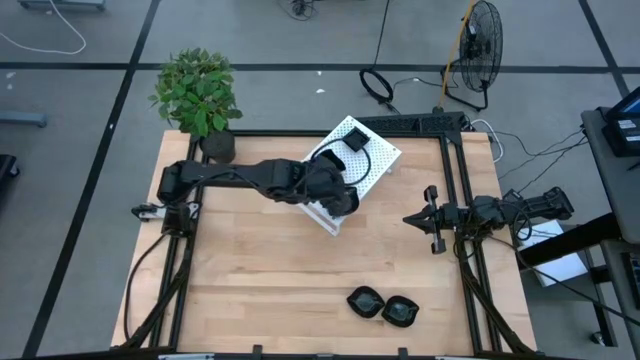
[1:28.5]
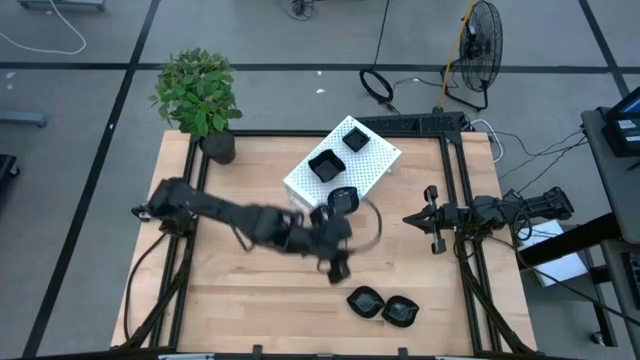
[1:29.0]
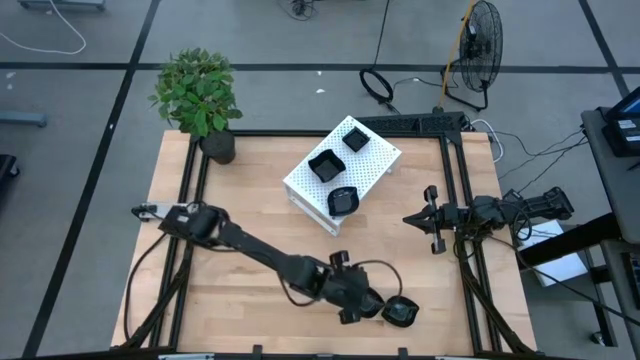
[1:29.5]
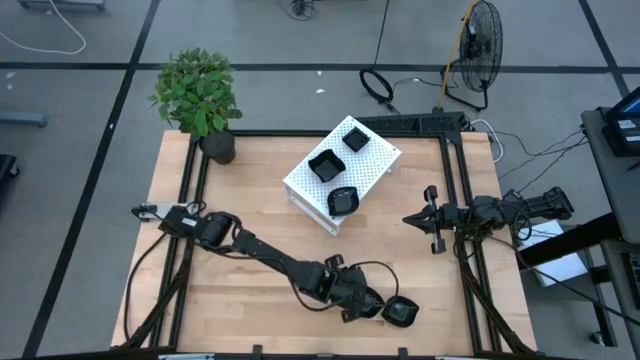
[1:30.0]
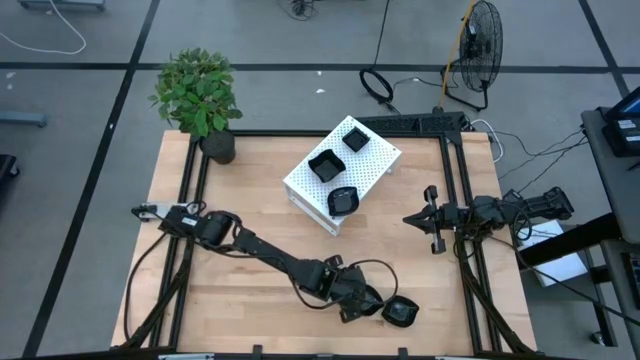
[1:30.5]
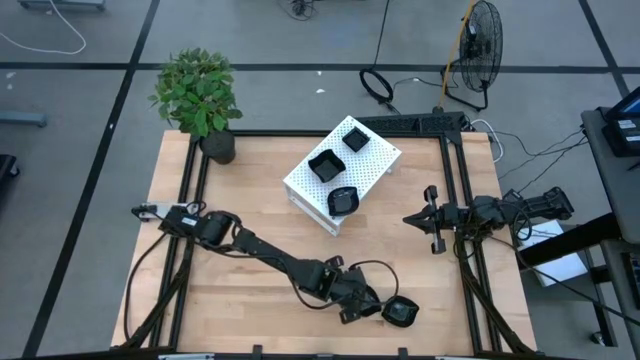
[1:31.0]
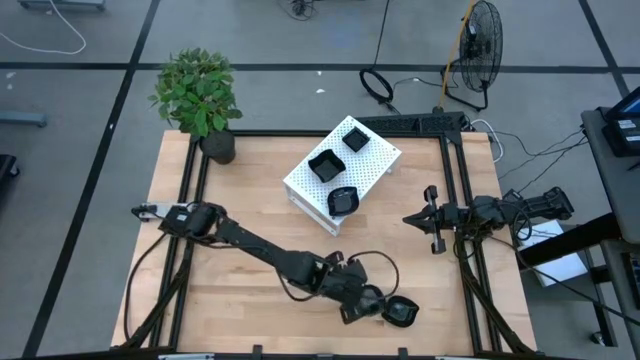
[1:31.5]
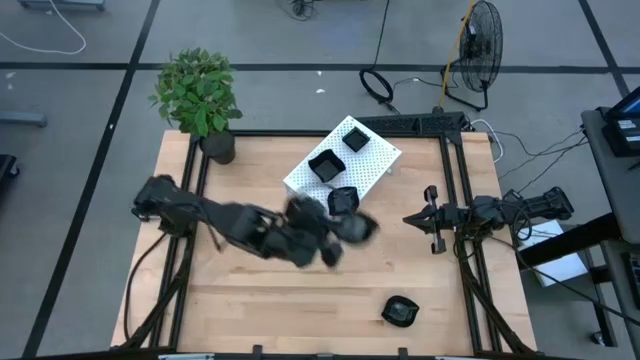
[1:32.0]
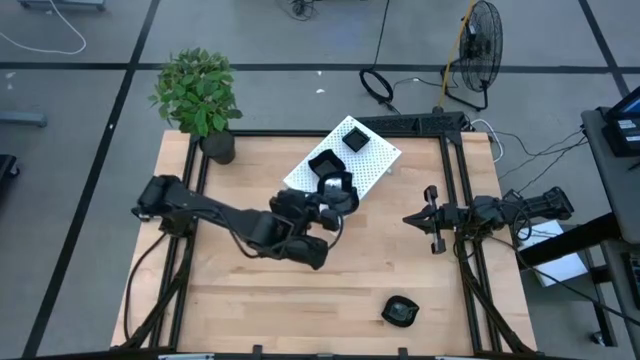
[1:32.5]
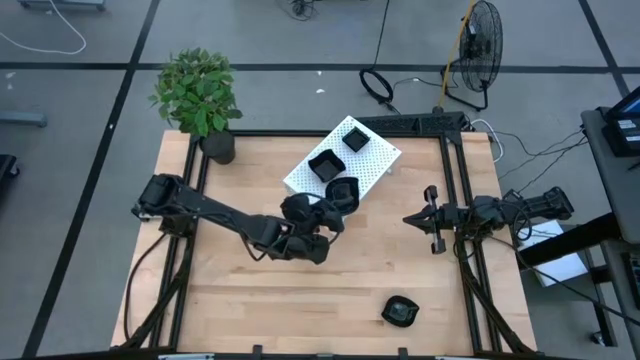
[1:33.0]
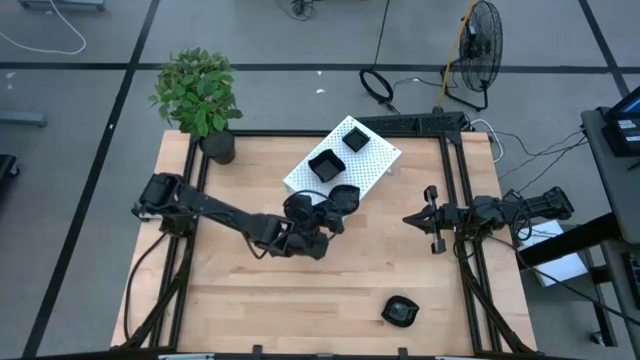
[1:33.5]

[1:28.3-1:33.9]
Task: Pick & Place Mini shaped plates
Stack the black leaf shaped plate on top of the black leaf shaped plate on the shelf

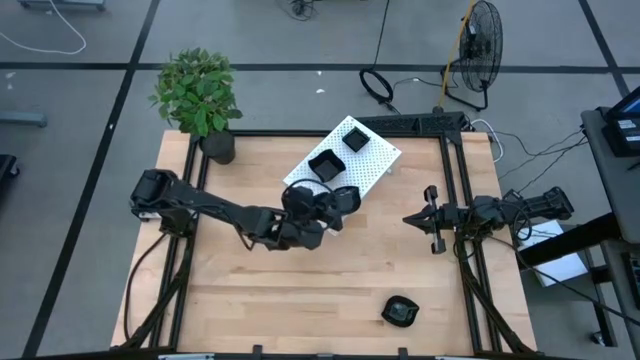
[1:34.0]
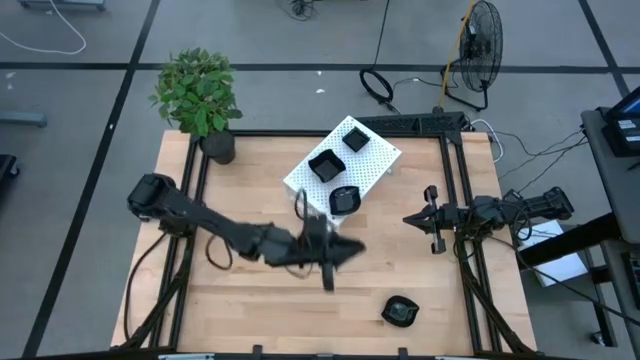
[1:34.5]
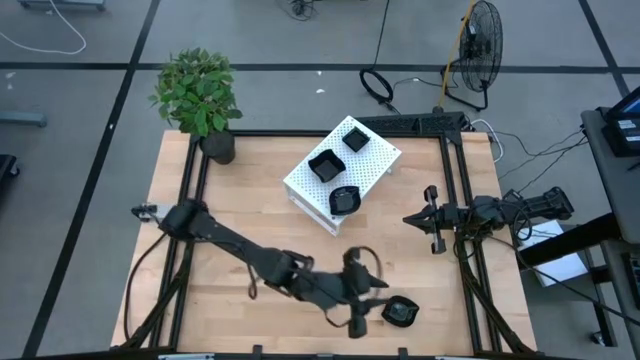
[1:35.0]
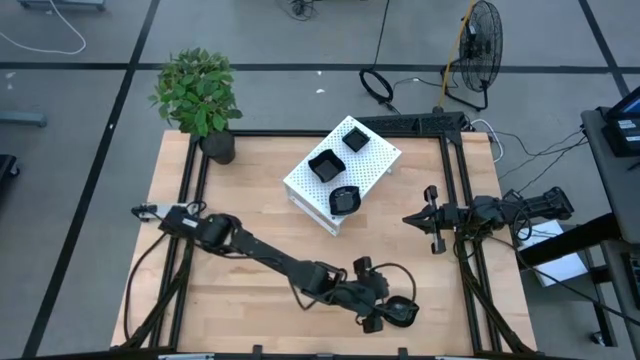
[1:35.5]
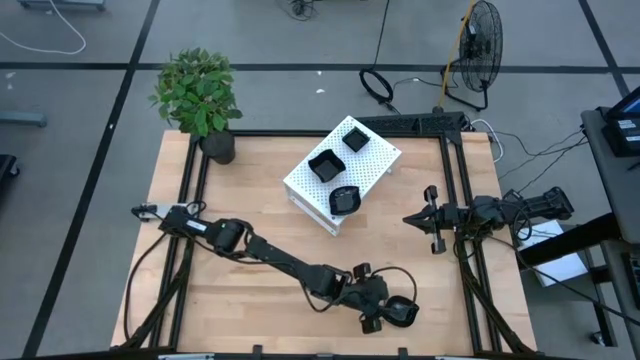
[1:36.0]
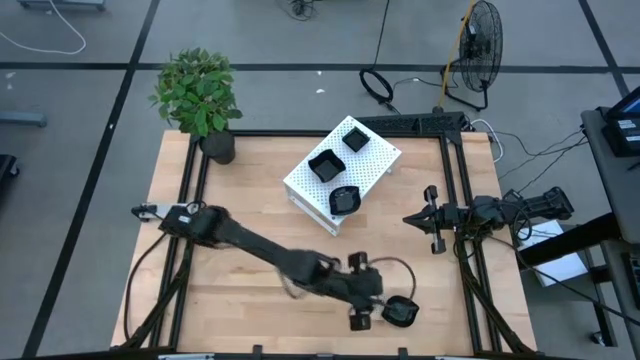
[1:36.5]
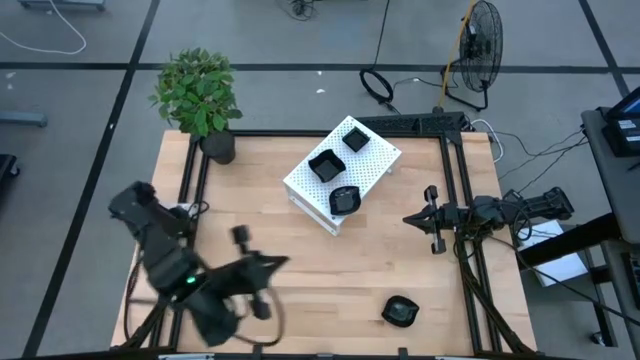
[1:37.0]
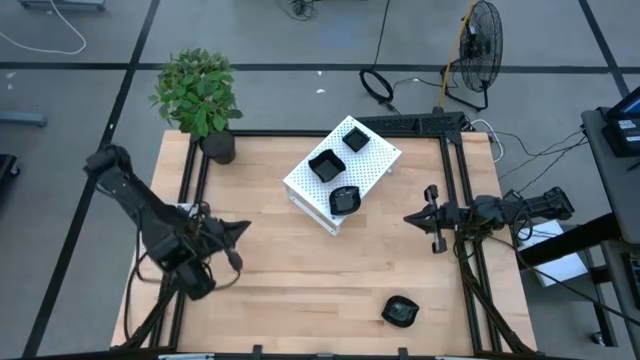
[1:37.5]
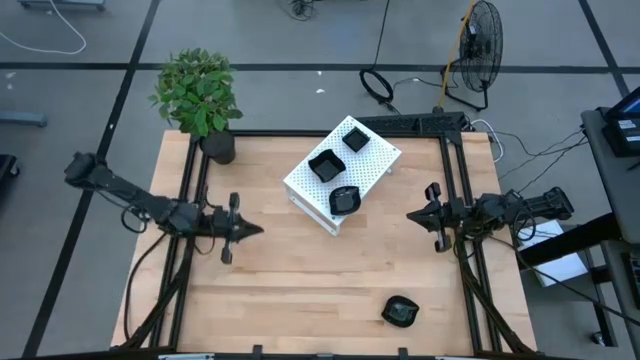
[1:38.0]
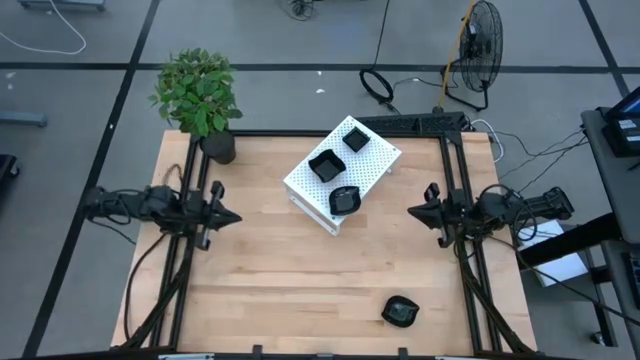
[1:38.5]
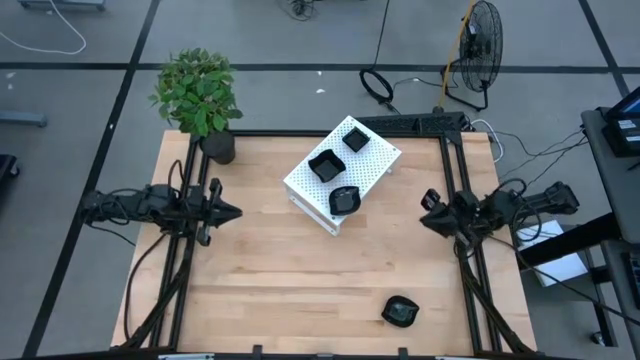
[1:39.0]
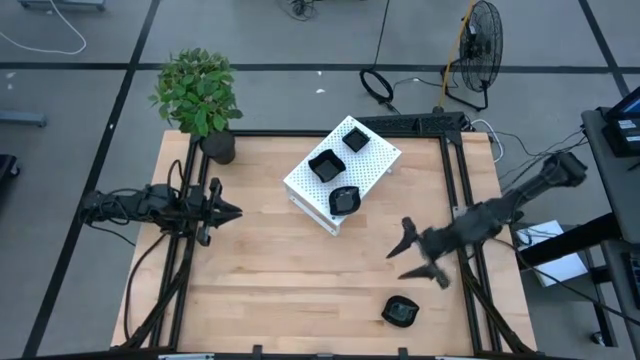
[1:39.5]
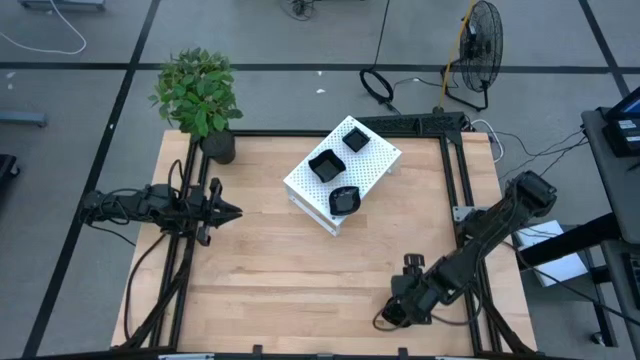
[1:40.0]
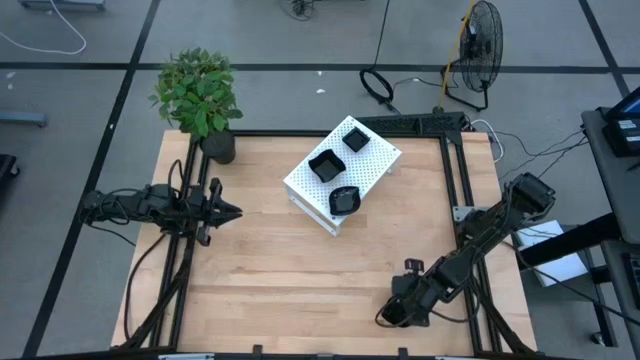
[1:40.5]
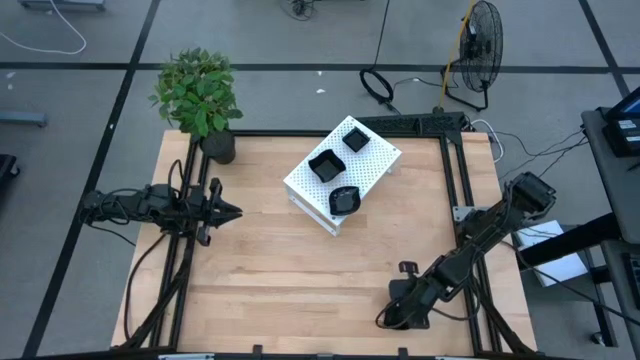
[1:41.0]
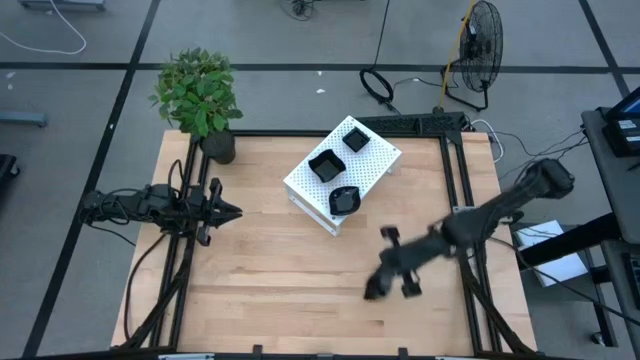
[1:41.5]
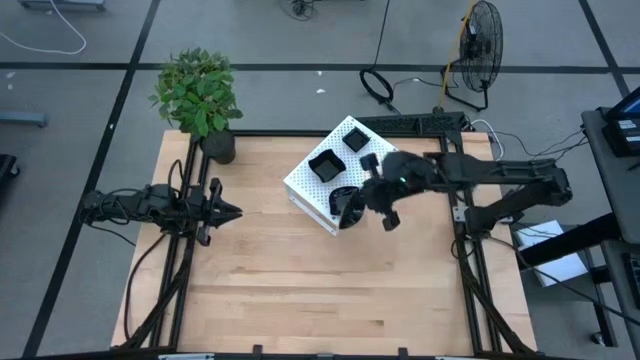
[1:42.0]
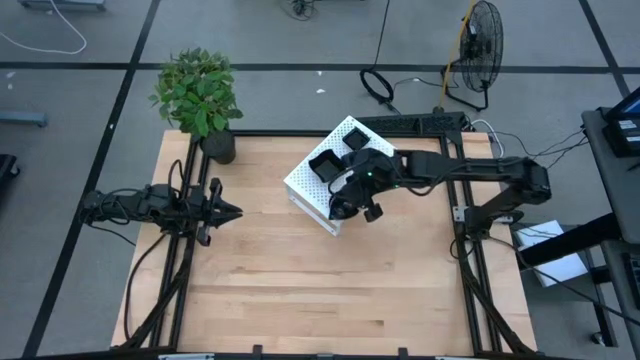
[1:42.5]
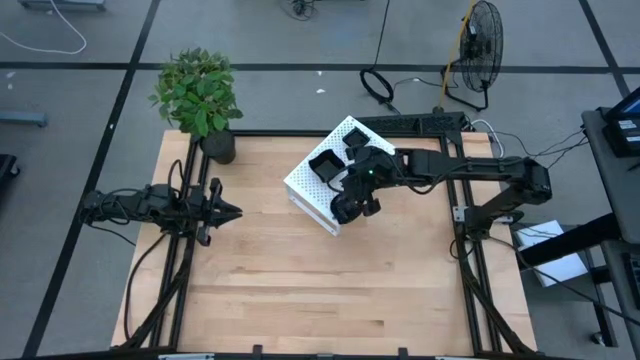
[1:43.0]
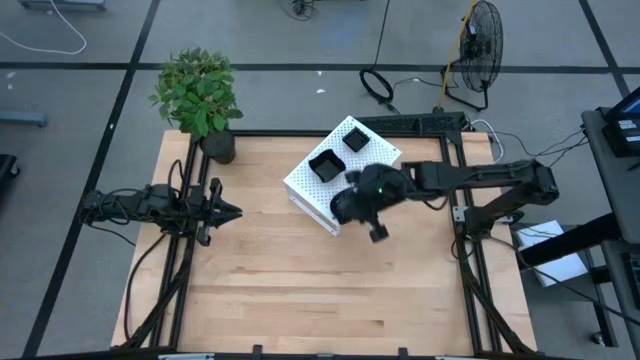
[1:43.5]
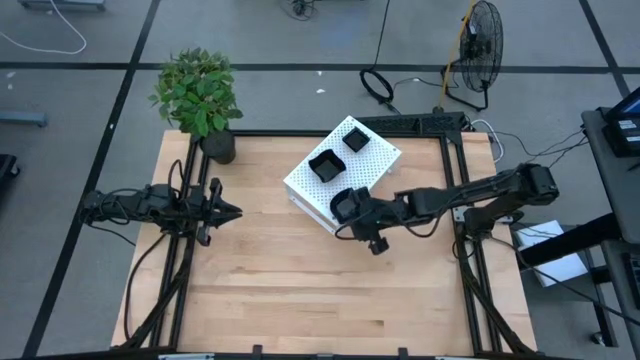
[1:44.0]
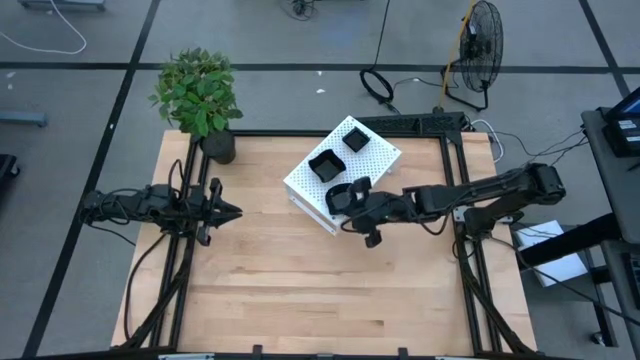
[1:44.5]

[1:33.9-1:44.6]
Stack the black leaf shaped plate on top of the black leaf shaped plate on the shelf

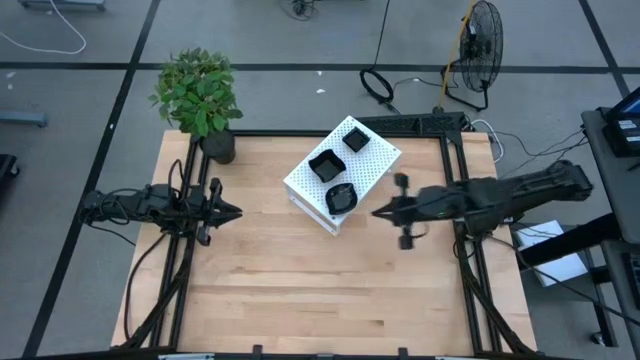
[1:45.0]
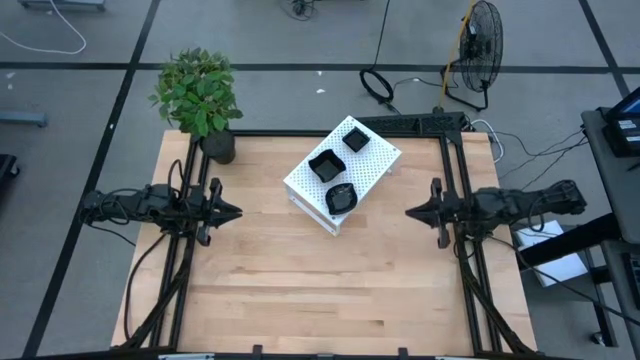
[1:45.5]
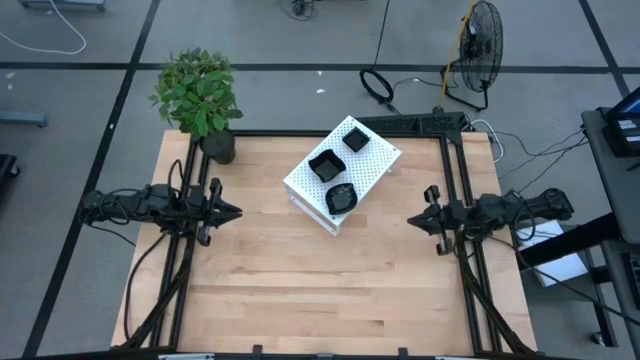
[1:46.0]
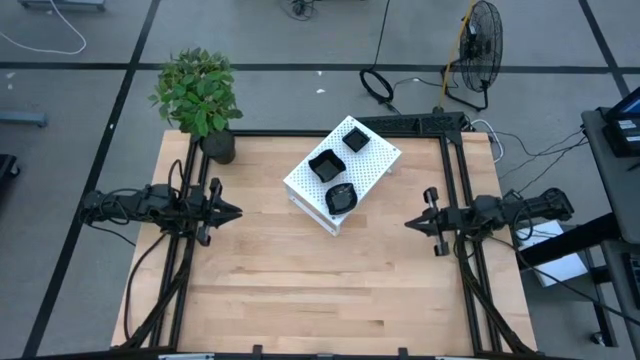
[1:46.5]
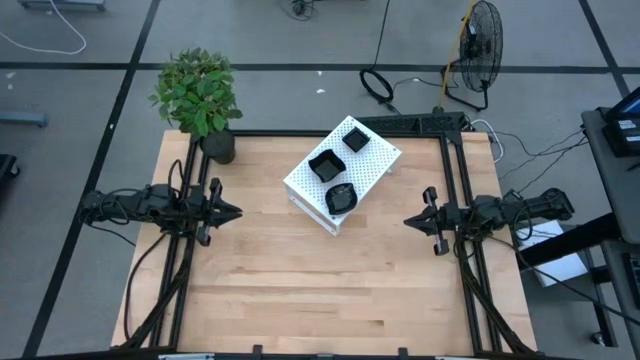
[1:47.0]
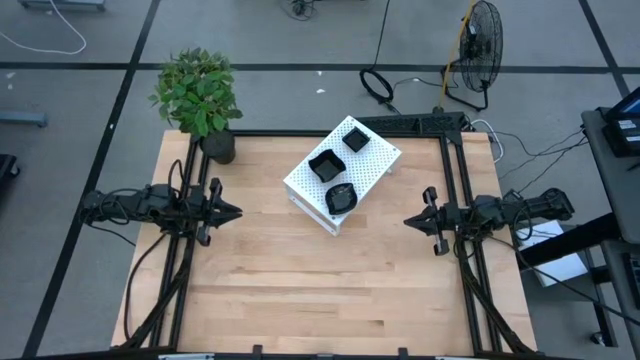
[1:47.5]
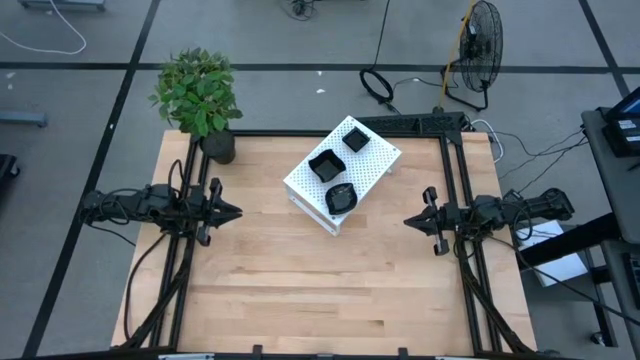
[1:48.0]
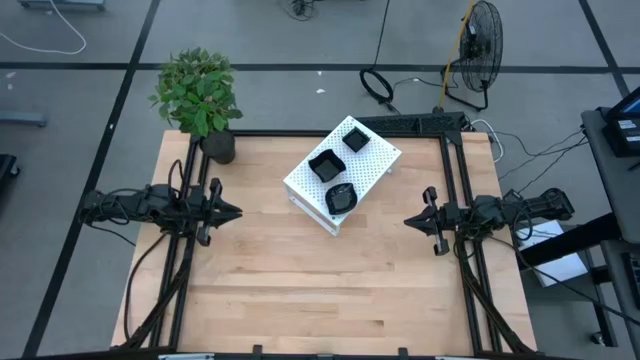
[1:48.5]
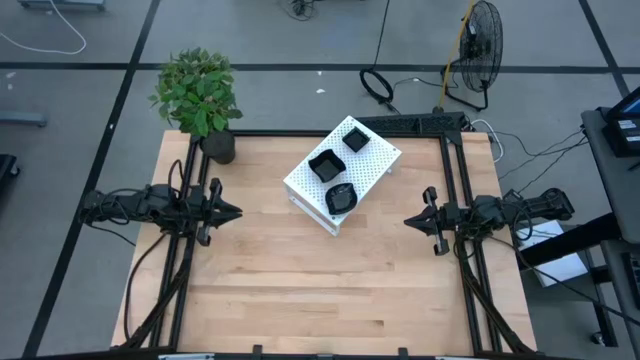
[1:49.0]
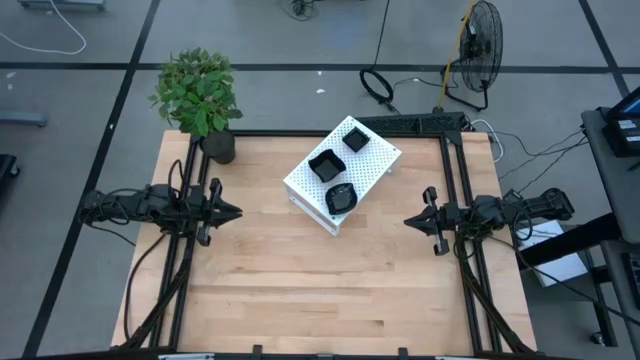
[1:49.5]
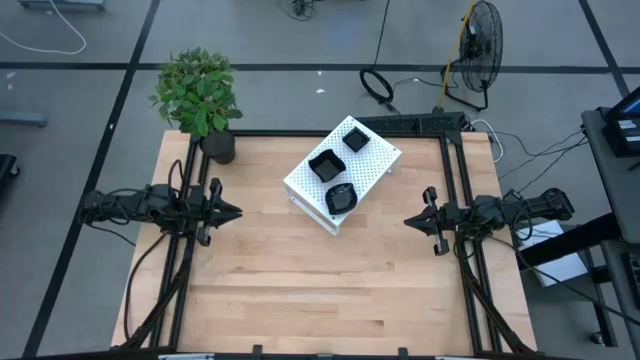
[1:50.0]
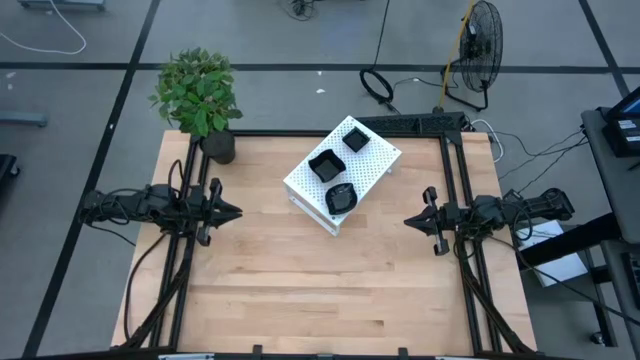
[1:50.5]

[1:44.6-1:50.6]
Return to Home Position
